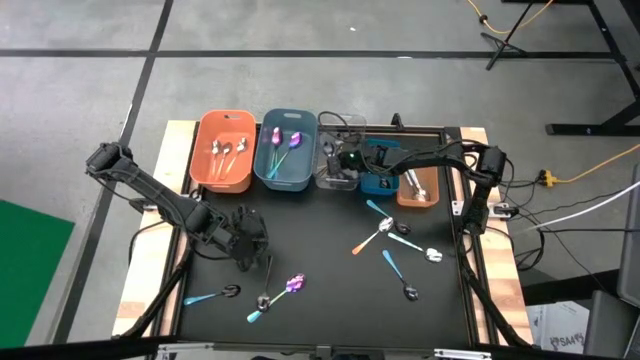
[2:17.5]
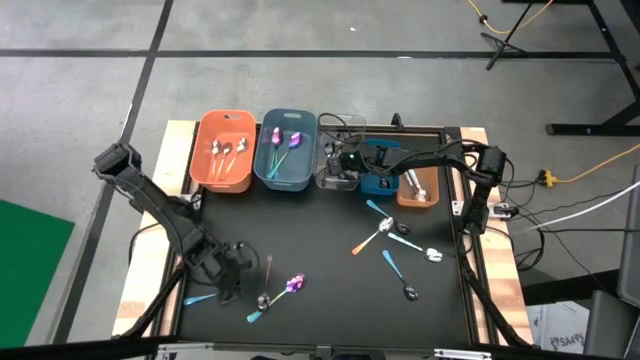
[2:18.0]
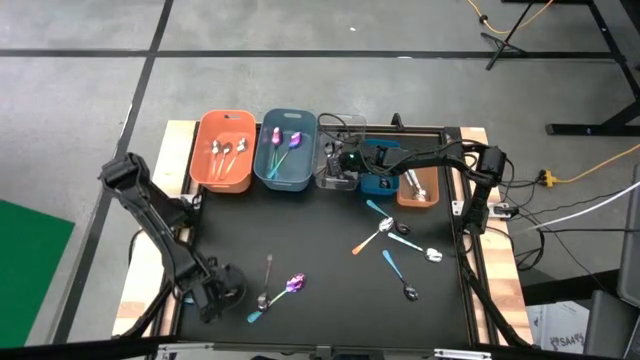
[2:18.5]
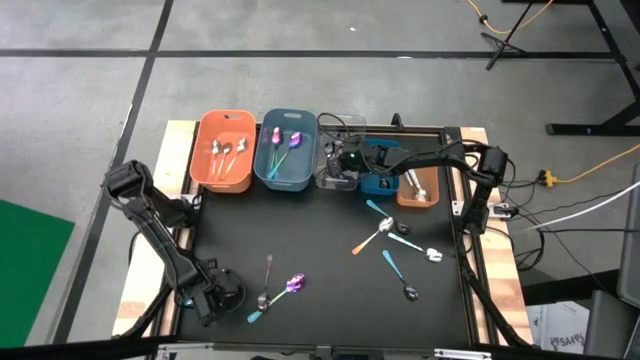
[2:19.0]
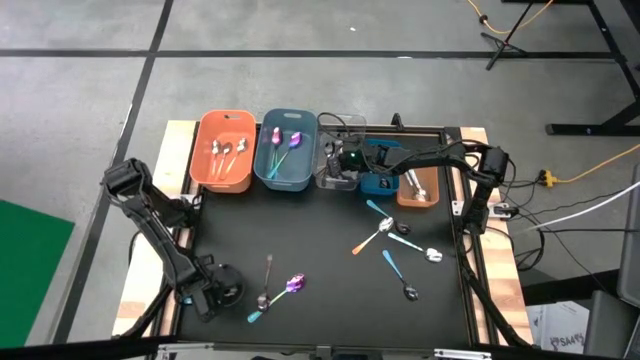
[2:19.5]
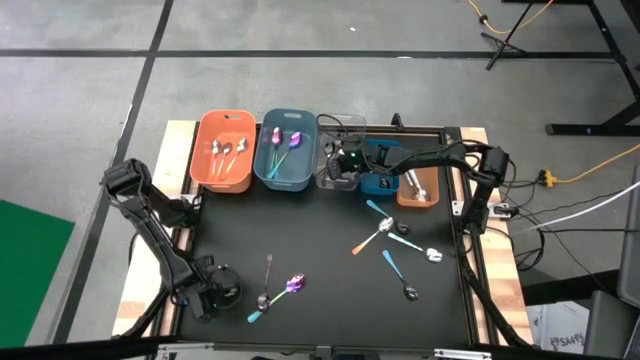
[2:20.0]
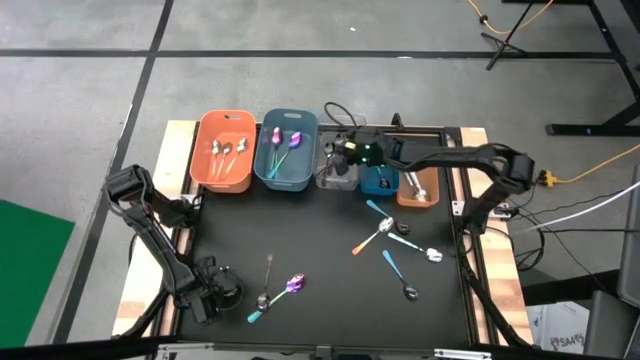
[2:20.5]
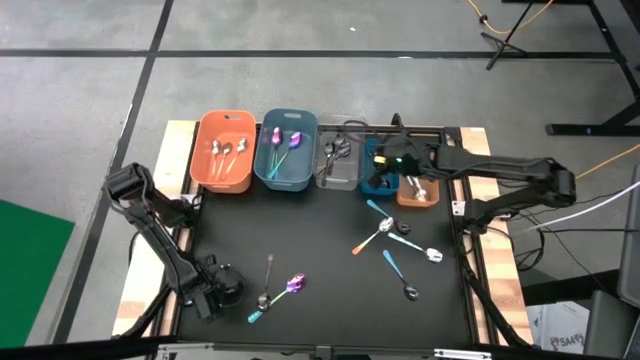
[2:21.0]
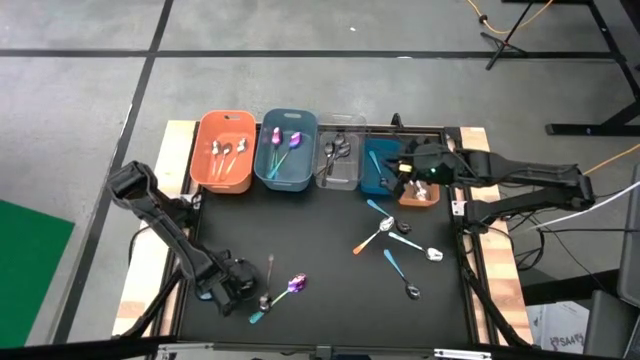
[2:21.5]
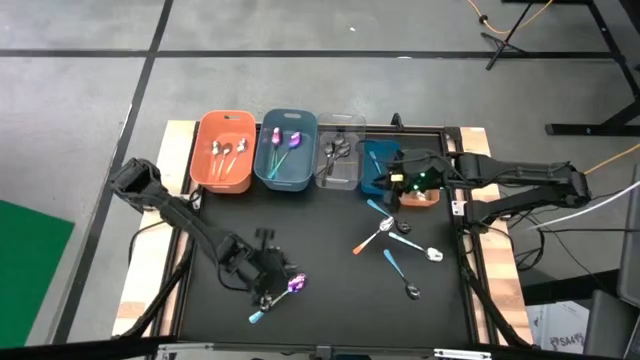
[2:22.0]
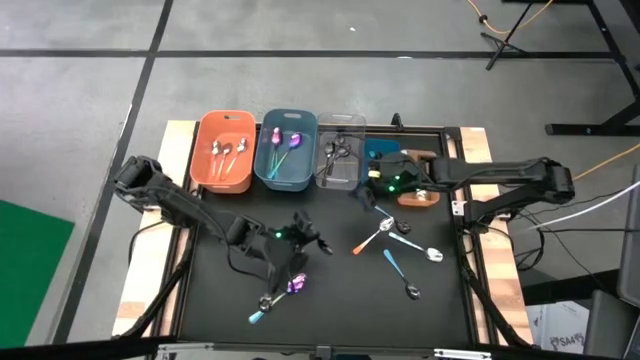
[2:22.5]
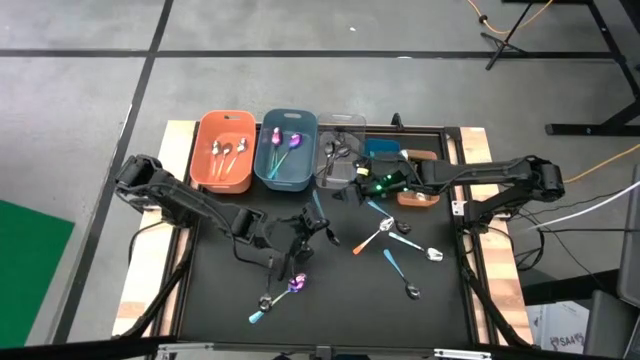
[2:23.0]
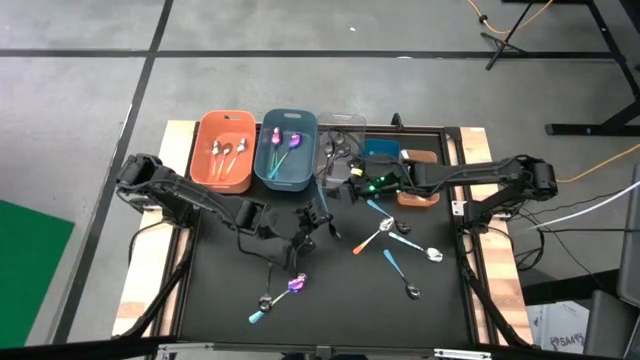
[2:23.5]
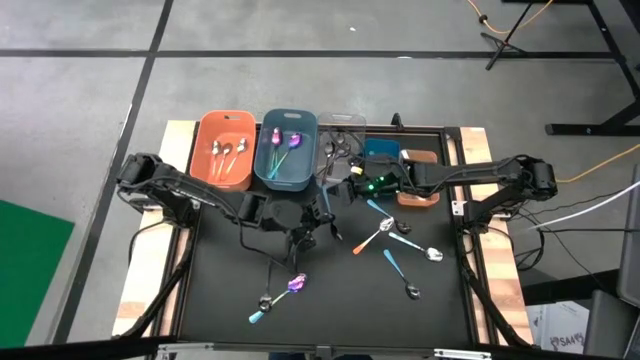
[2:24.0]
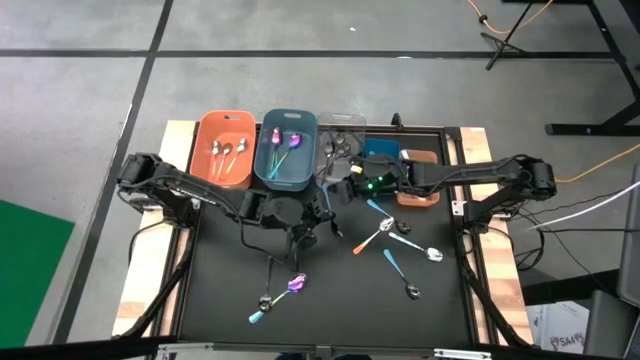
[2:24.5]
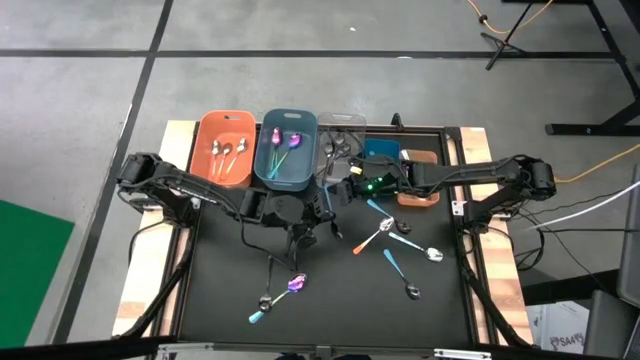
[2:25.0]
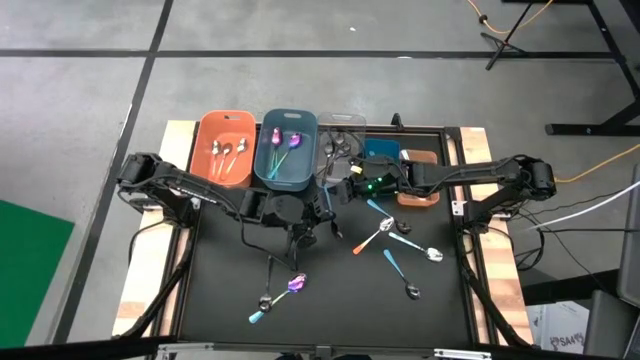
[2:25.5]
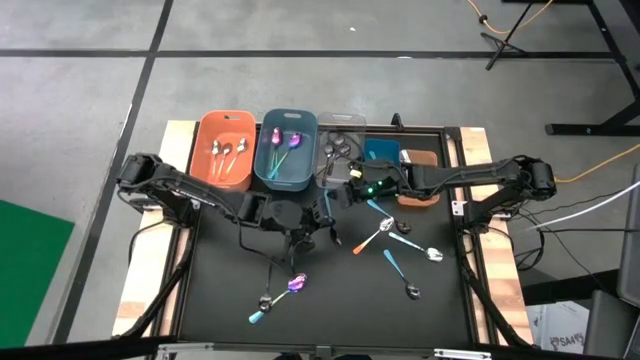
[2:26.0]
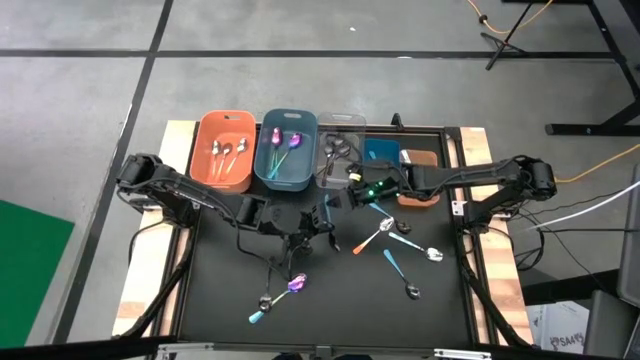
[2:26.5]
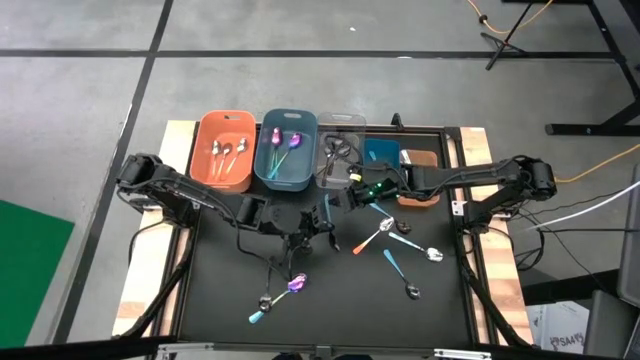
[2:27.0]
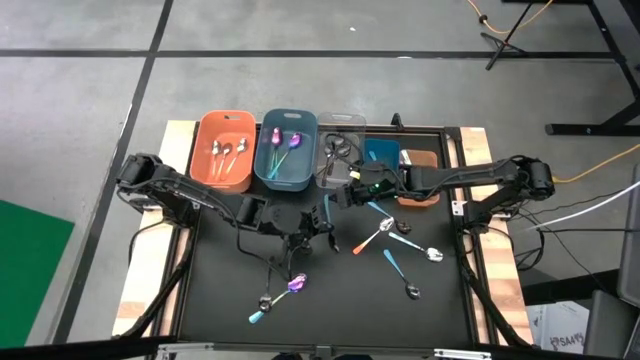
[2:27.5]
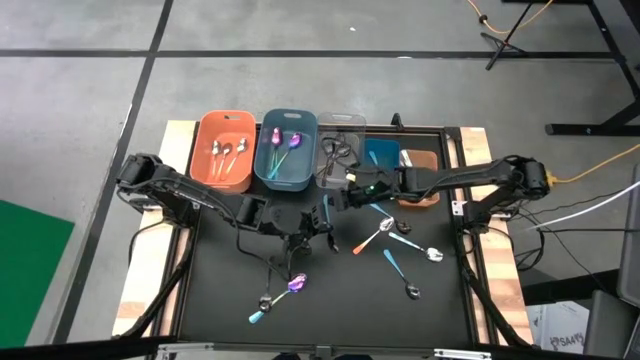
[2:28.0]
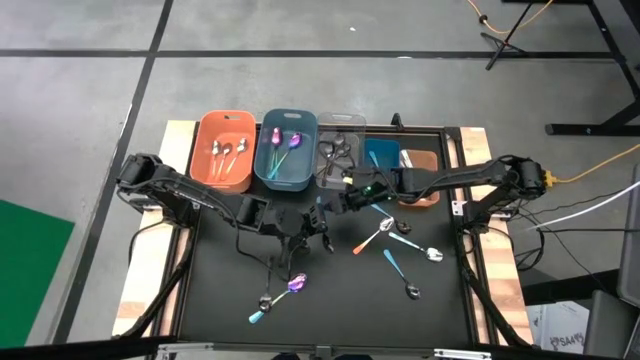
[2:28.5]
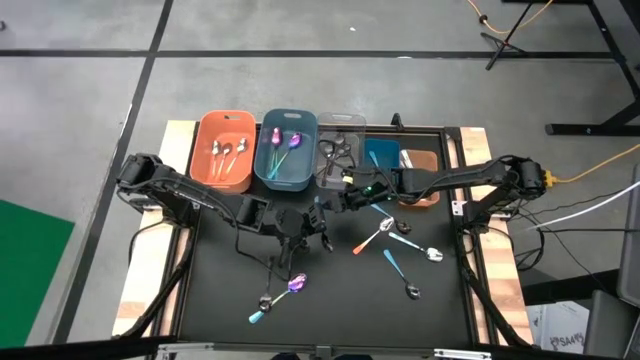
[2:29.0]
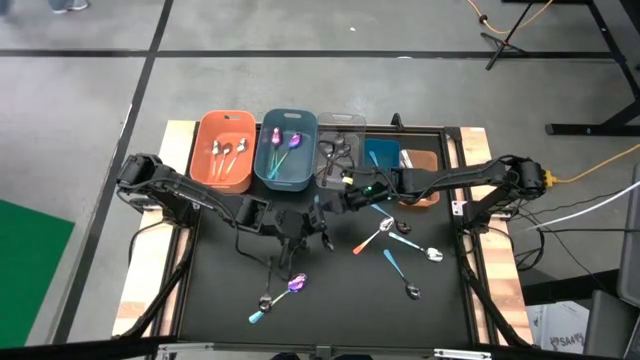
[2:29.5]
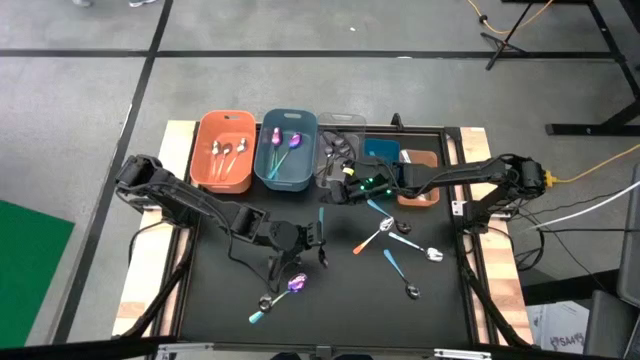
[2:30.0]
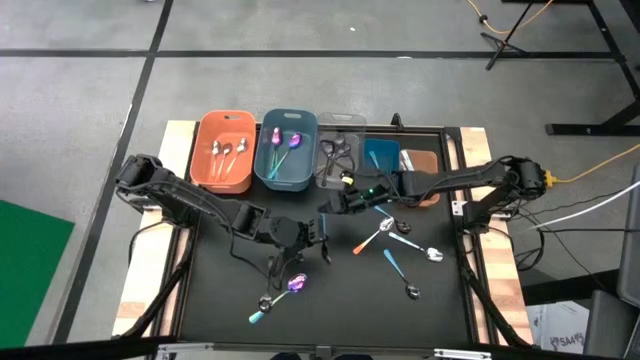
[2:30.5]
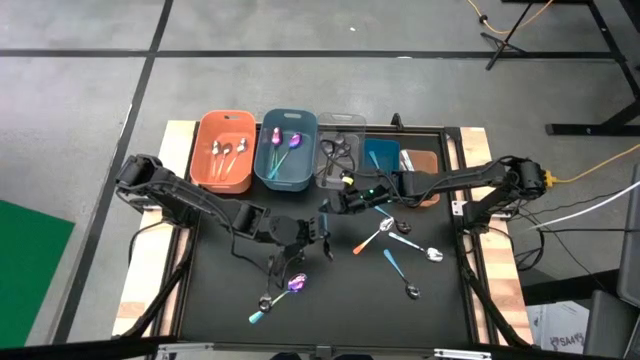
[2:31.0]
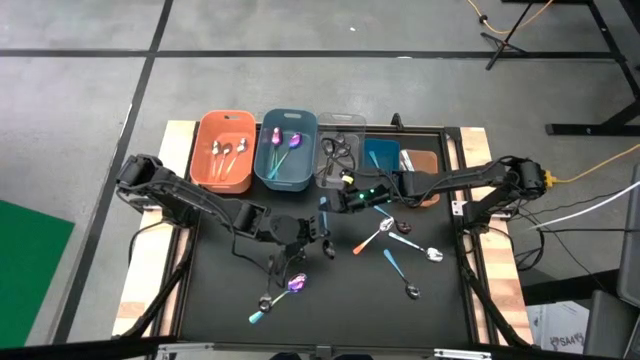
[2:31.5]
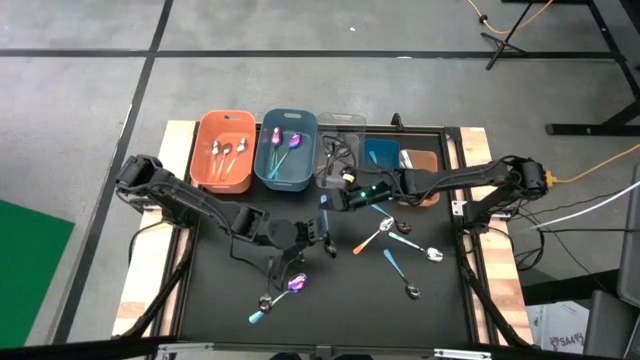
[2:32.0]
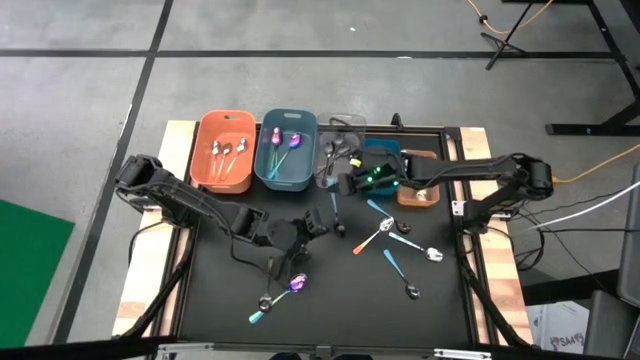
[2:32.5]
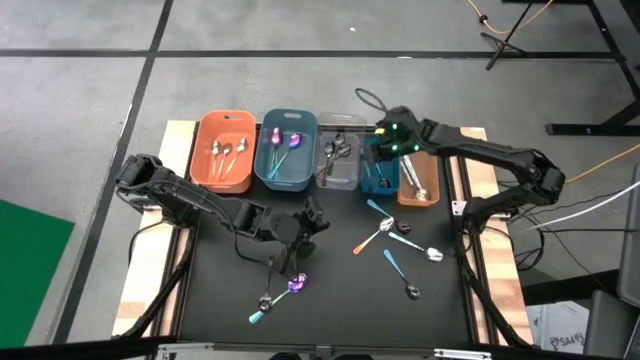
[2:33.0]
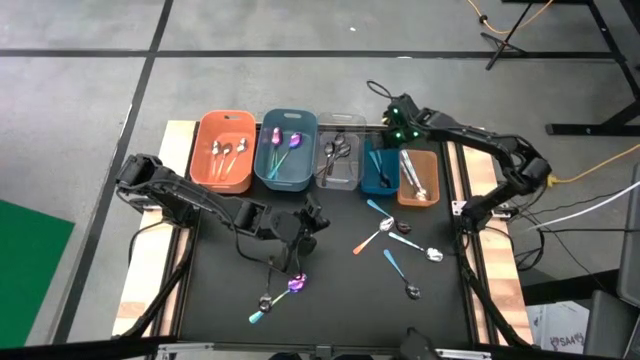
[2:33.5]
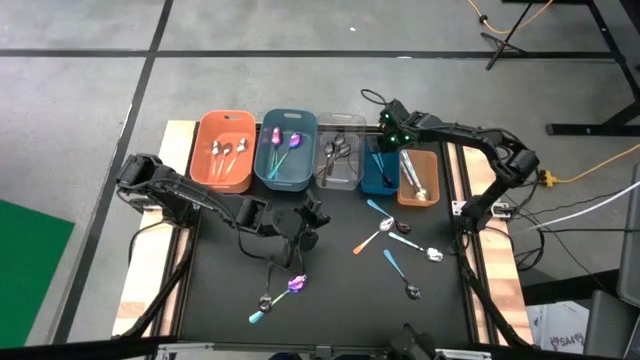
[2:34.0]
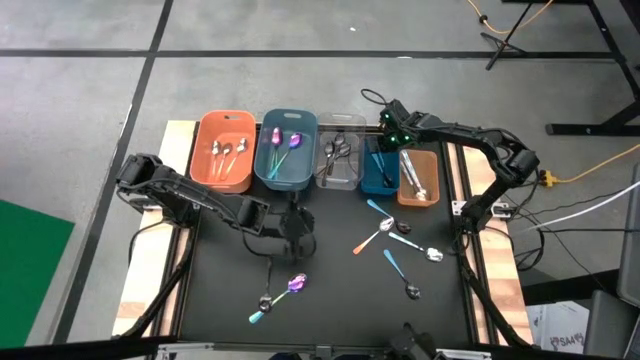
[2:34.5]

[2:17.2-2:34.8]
Task: Sort silverware by color (type)
Put the light blue spoon into the right blue bin

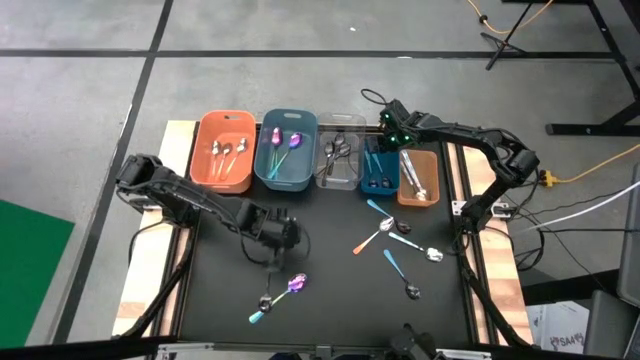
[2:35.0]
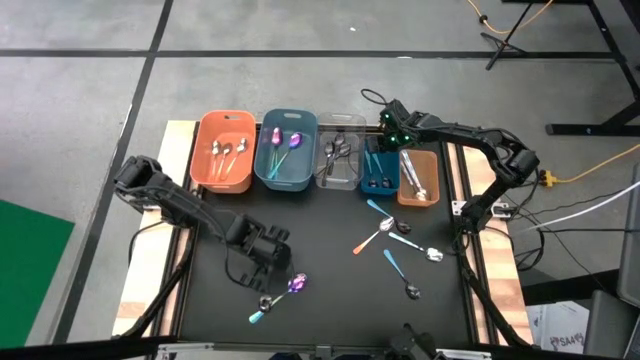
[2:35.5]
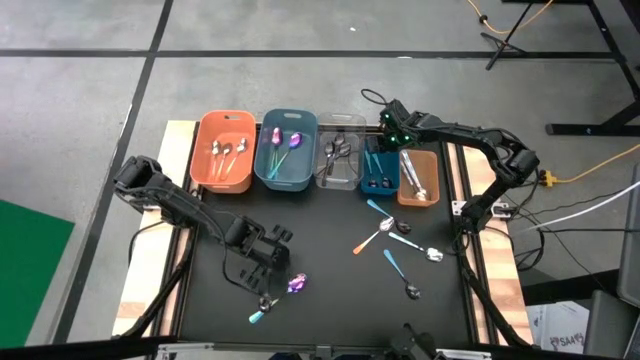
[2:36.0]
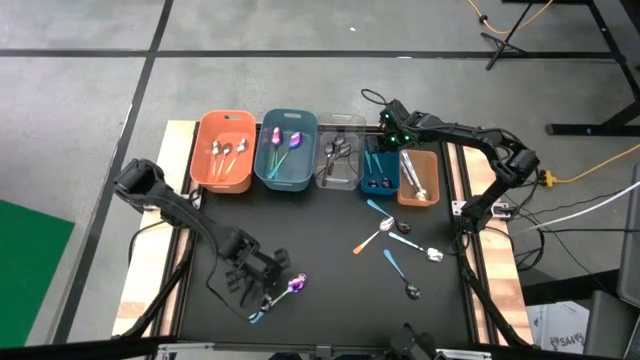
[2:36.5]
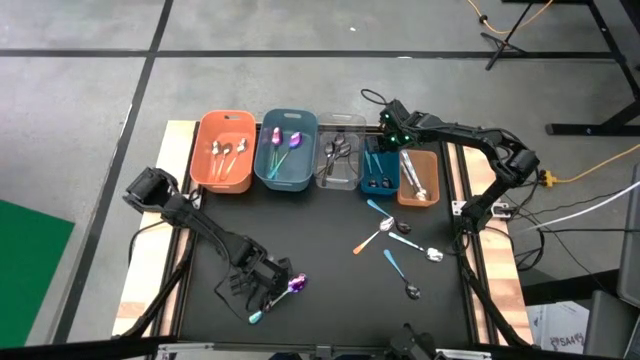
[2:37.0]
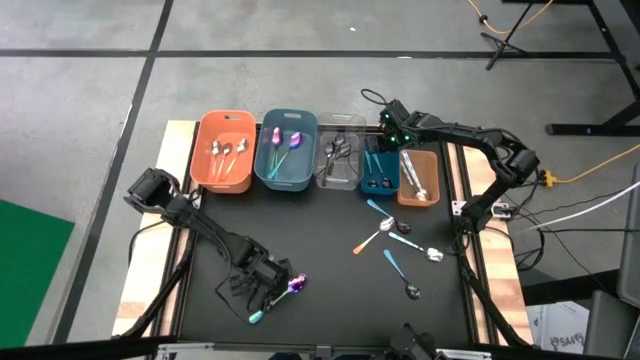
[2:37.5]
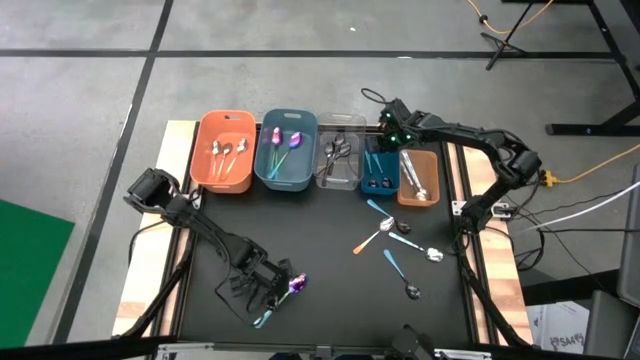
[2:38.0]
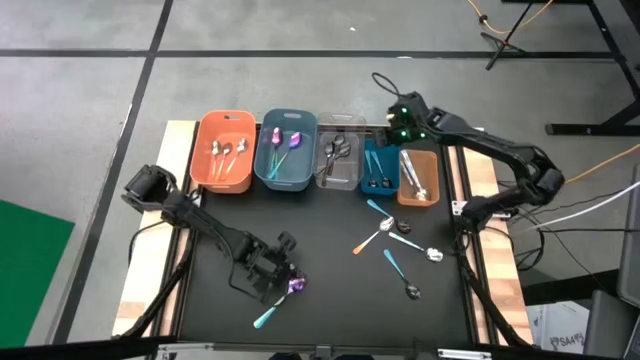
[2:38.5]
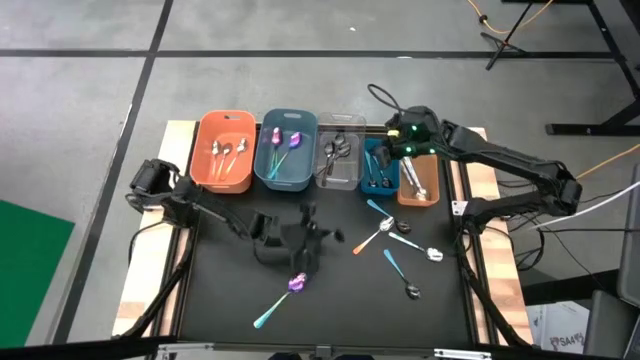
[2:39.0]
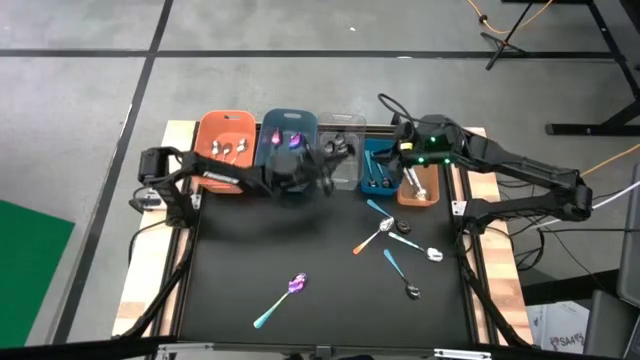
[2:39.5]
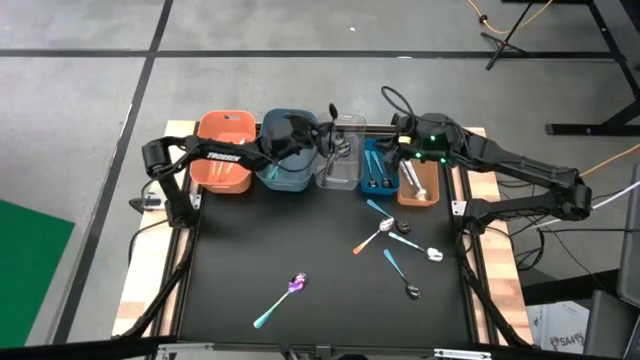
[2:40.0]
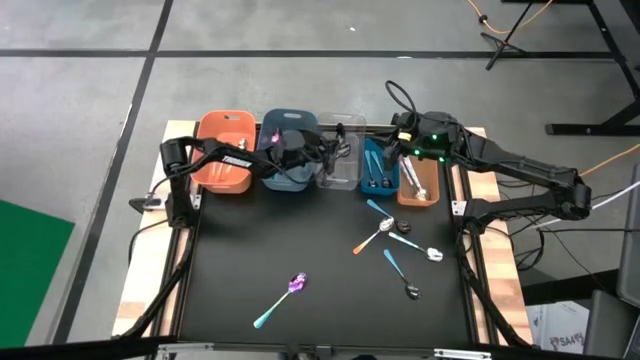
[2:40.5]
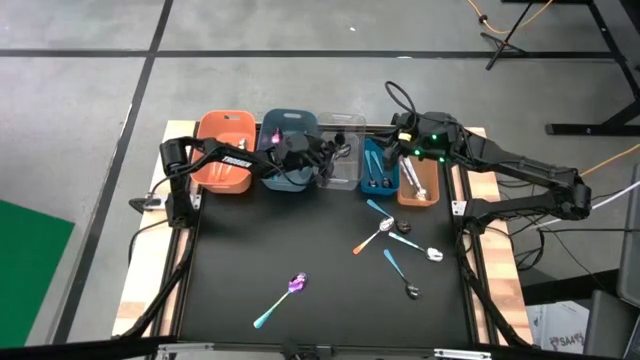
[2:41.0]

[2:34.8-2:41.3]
Put the black spoon into the transparent bin
